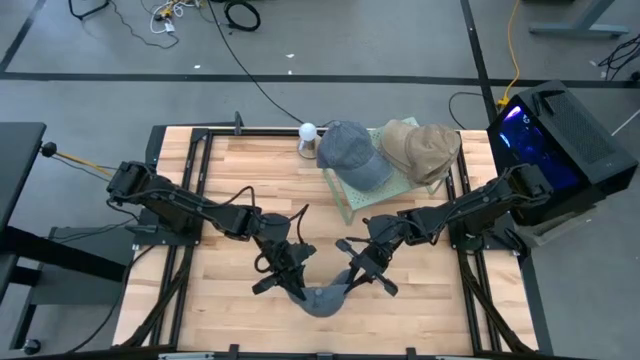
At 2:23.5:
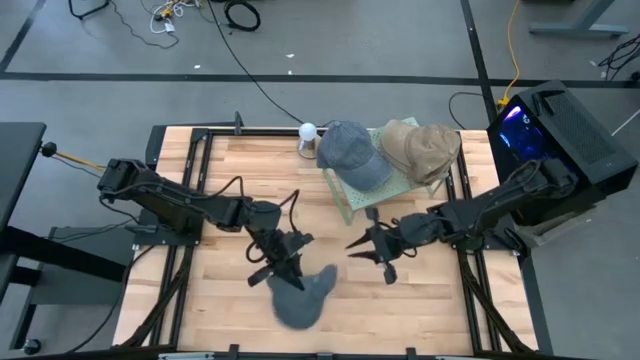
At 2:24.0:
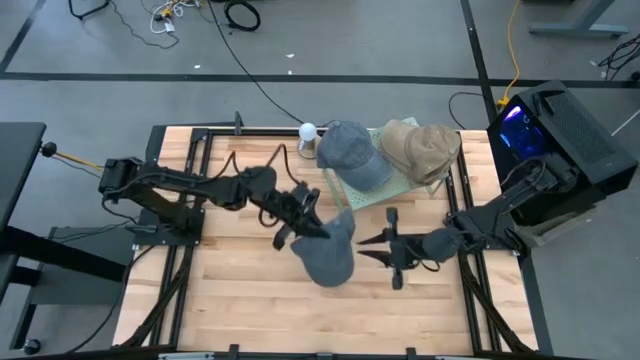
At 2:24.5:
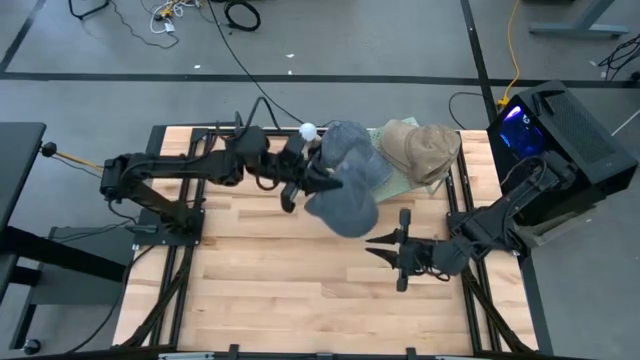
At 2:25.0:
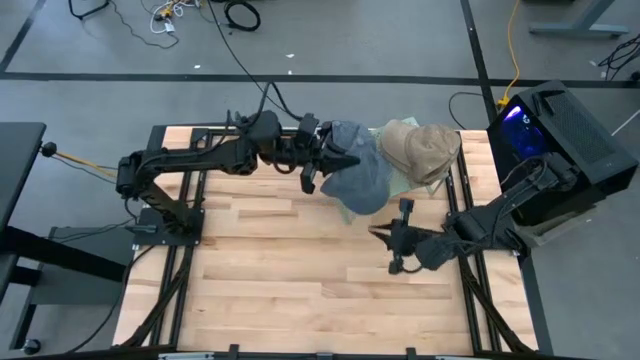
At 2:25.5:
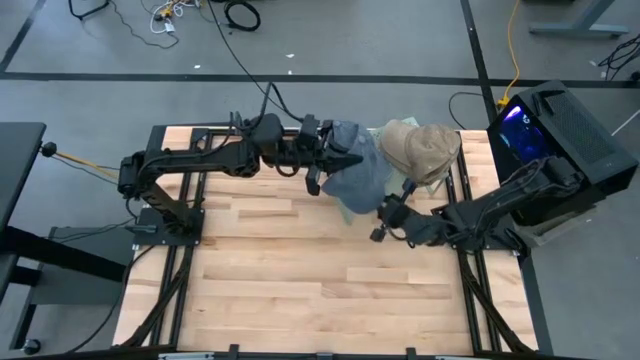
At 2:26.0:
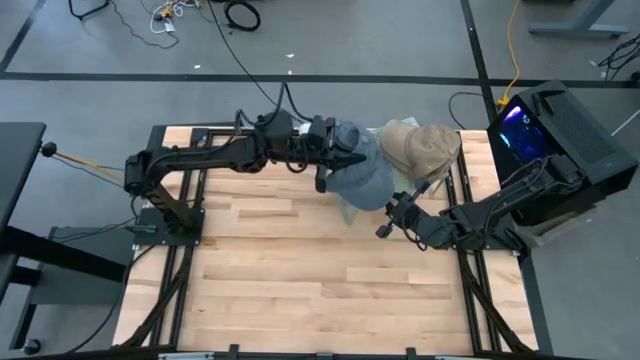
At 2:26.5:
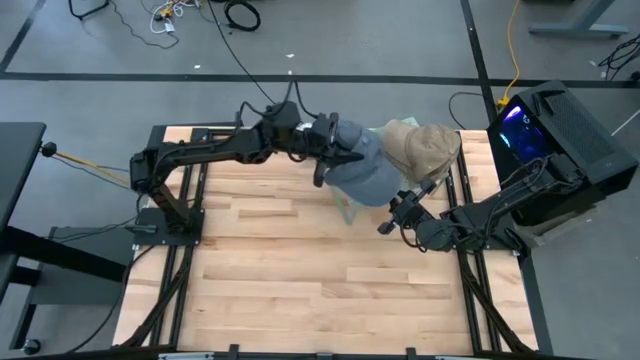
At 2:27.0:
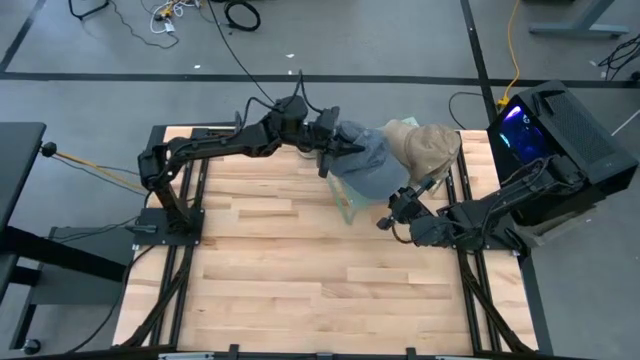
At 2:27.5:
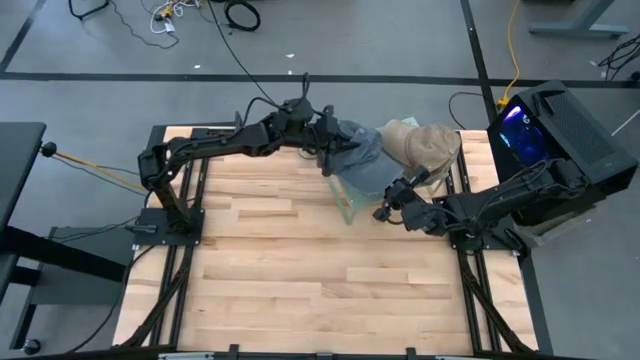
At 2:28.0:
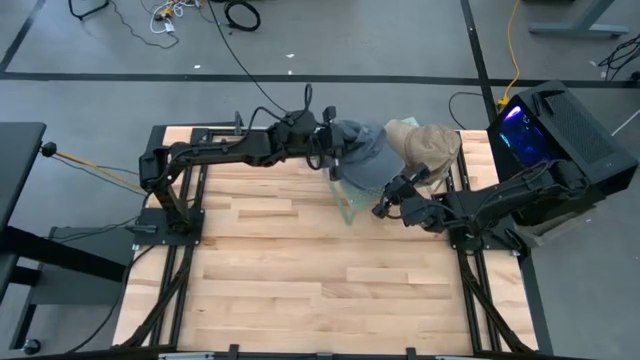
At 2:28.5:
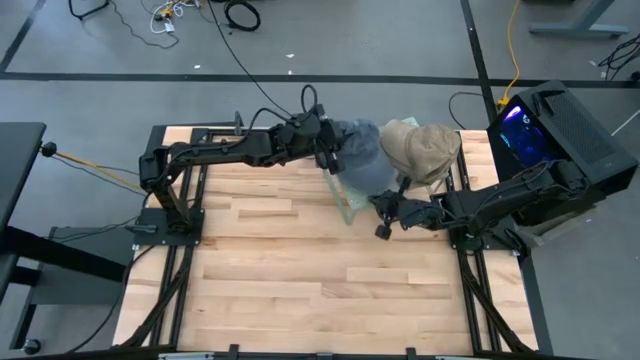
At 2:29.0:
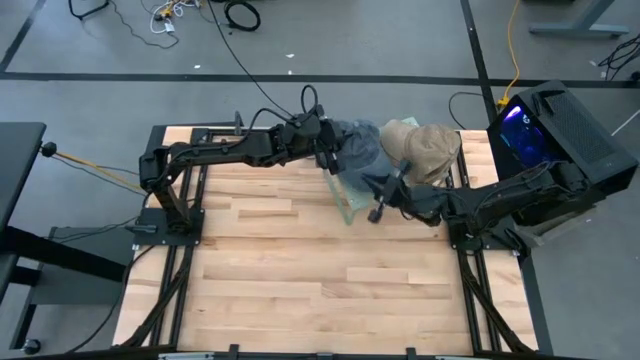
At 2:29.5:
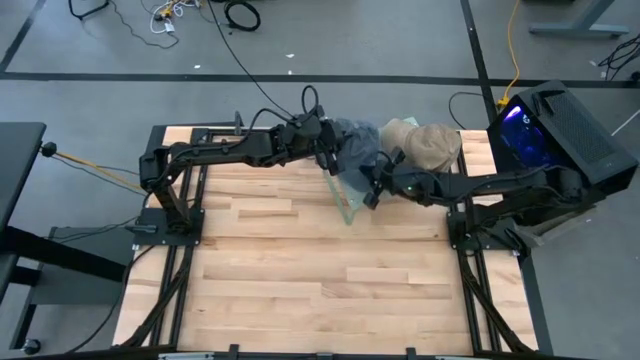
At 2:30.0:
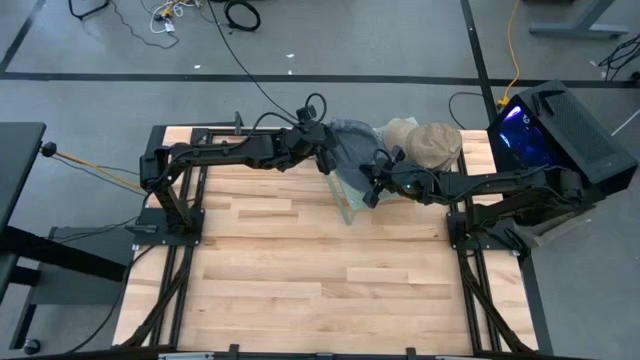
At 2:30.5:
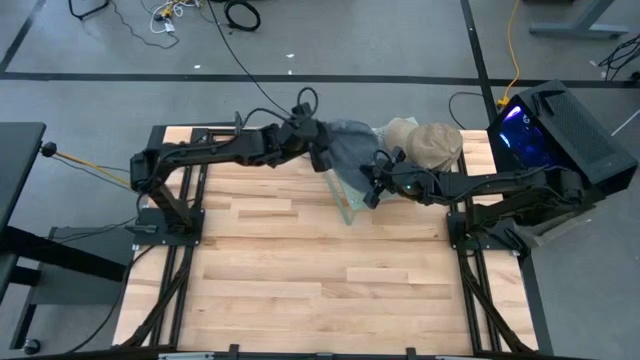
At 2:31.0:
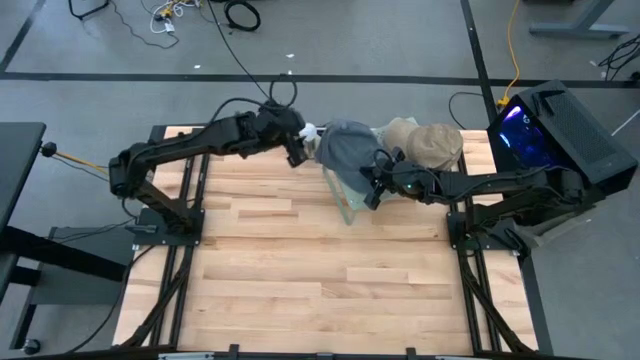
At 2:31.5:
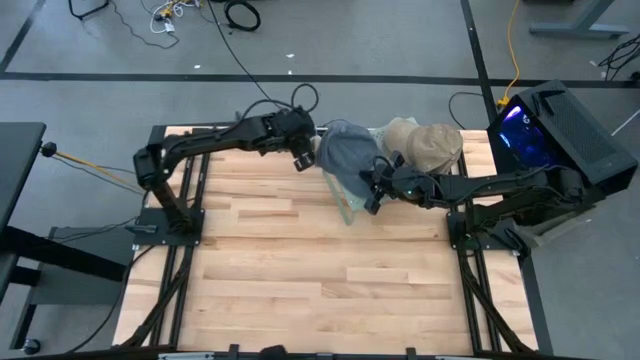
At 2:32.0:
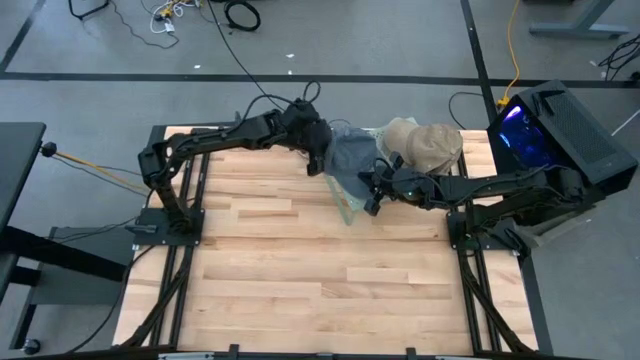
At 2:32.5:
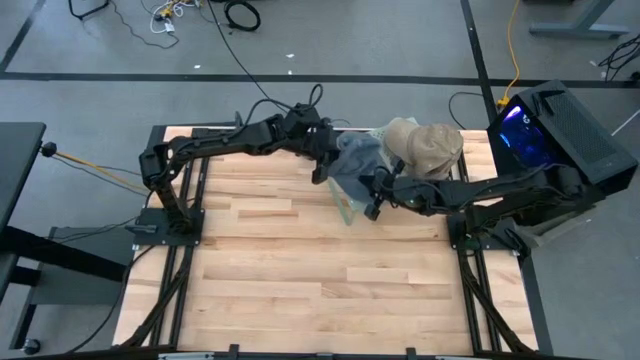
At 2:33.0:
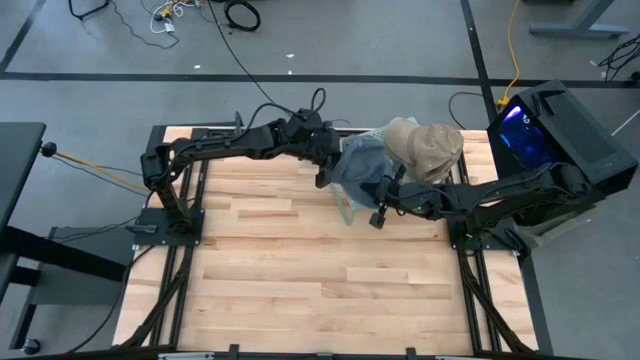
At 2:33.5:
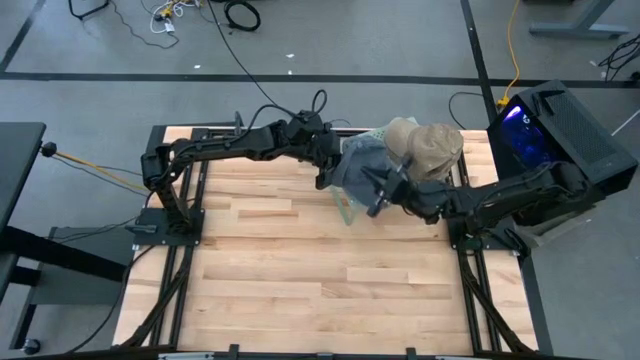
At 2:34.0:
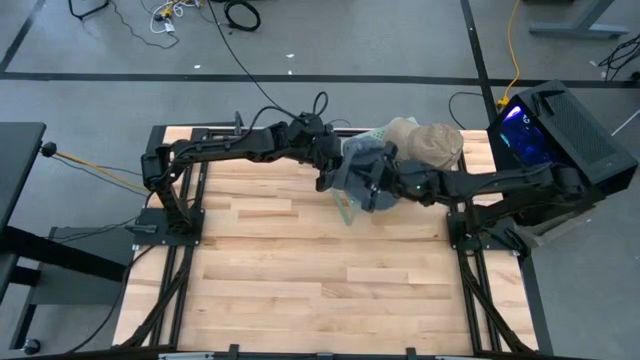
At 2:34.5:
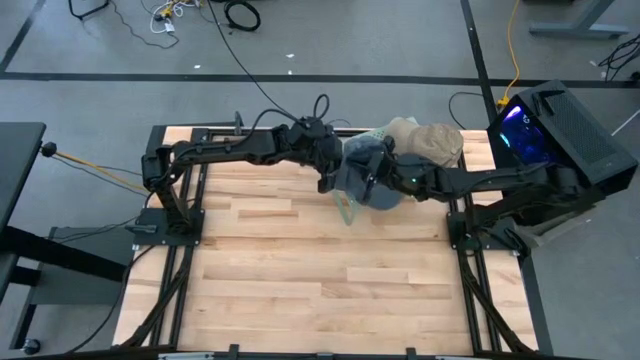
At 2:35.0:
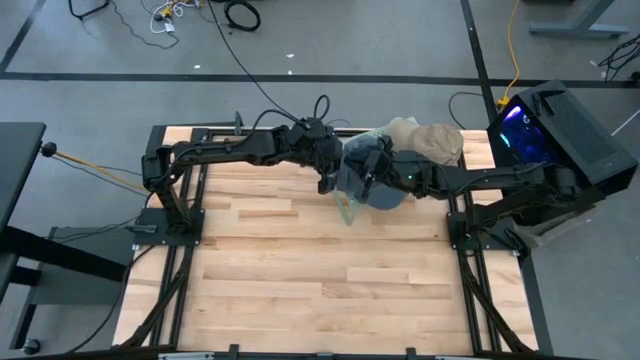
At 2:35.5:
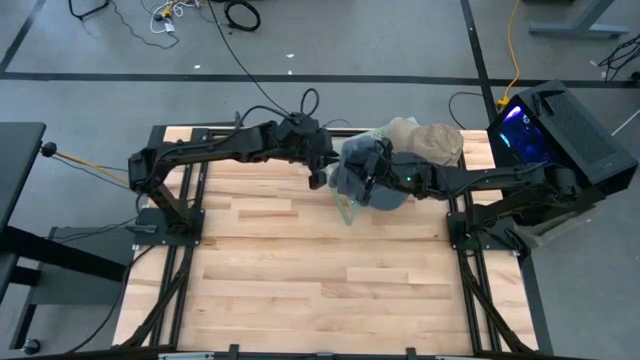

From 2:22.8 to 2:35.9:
Task: Stack caps on shelf
Stack the black cap on the black cap on the shelf

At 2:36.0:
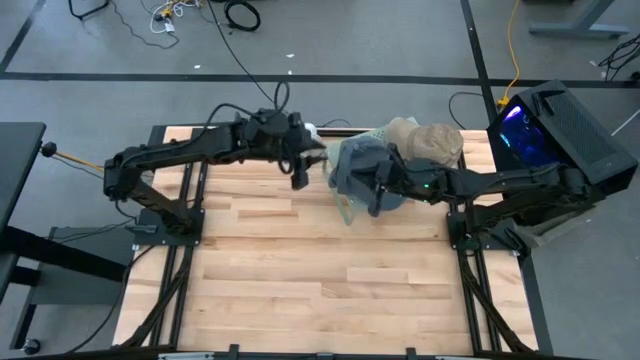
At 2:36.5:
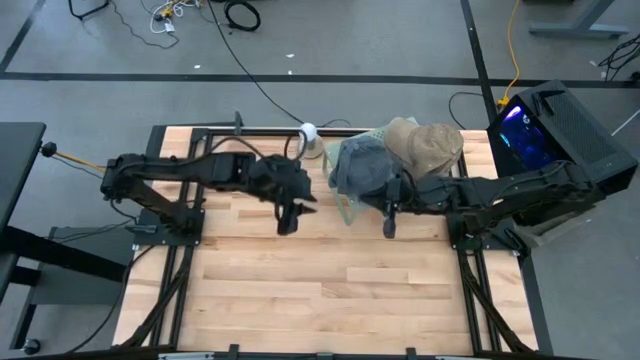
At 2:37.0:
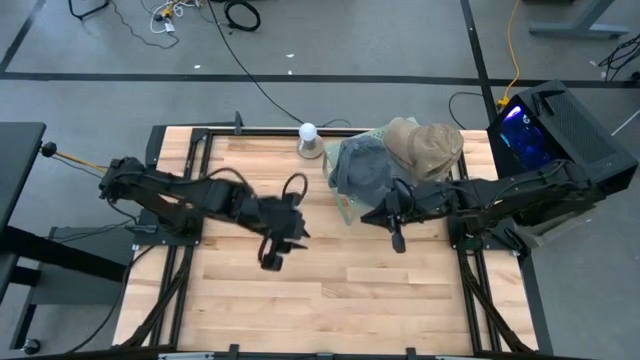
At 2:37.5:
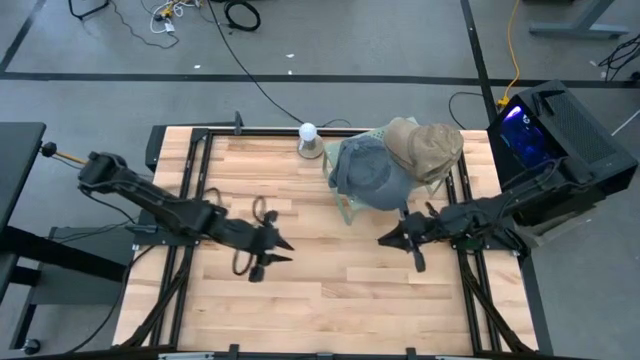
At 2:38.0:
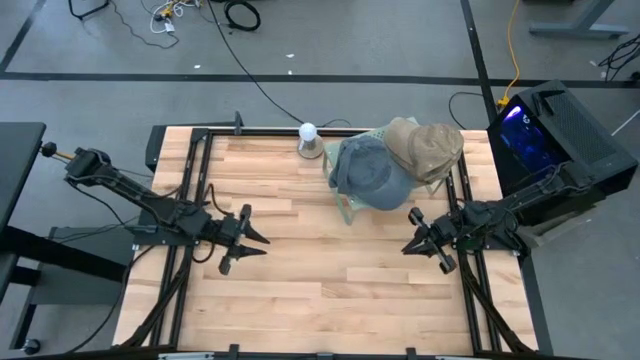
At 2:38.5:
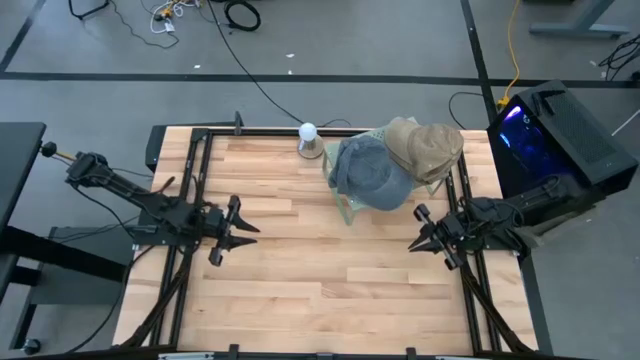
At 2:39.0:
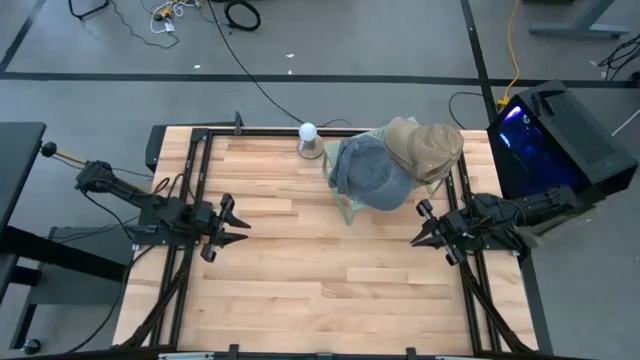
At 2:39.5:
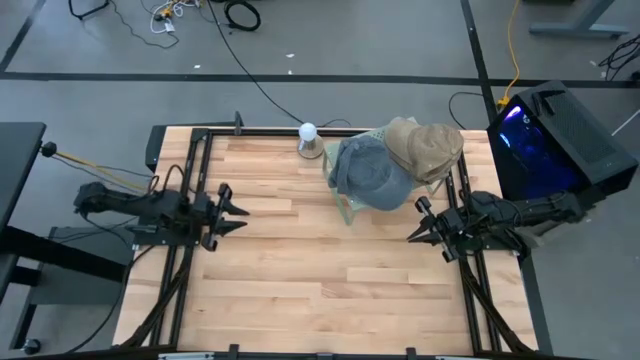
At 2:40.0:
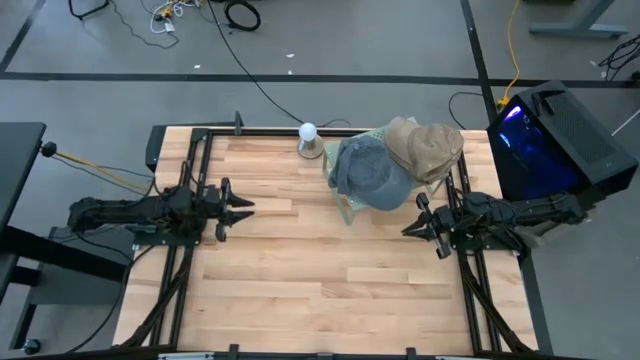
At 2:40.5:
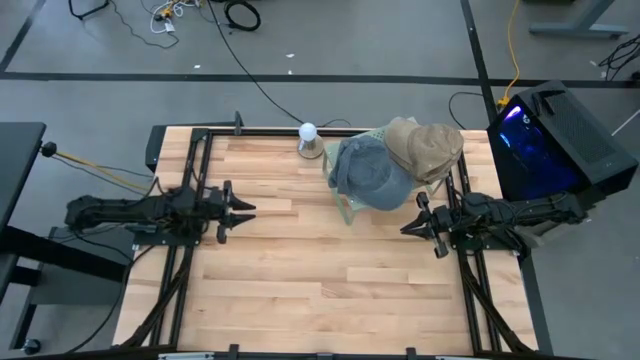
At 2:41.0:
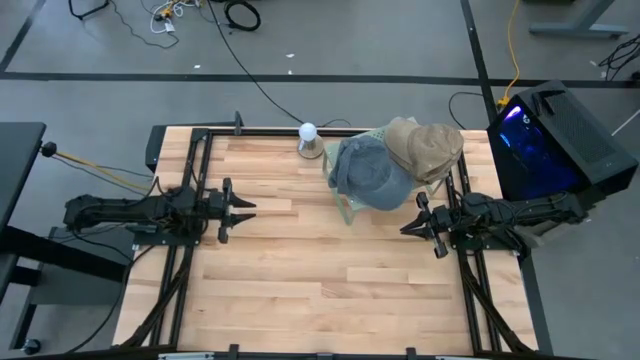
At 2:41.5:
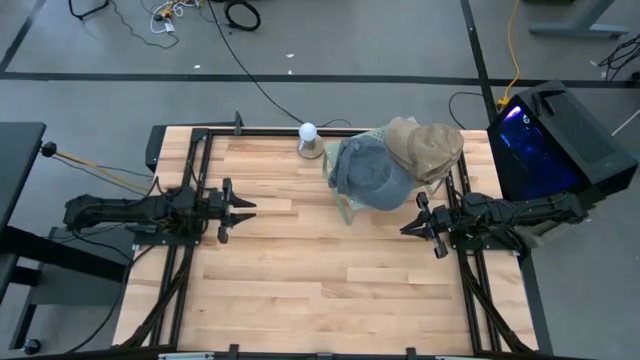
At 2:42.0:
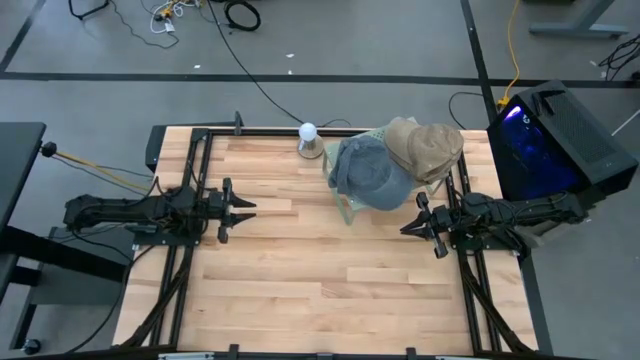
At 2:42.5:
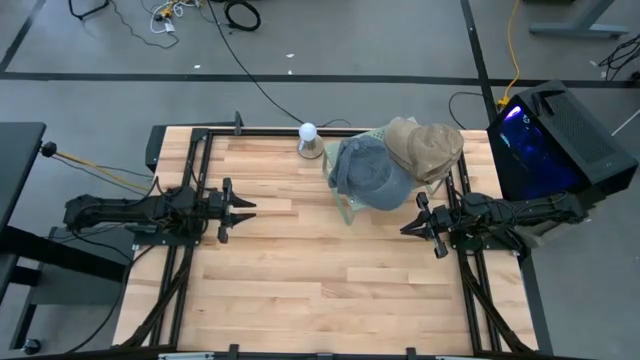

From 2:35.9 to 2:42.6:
Return to Home Position

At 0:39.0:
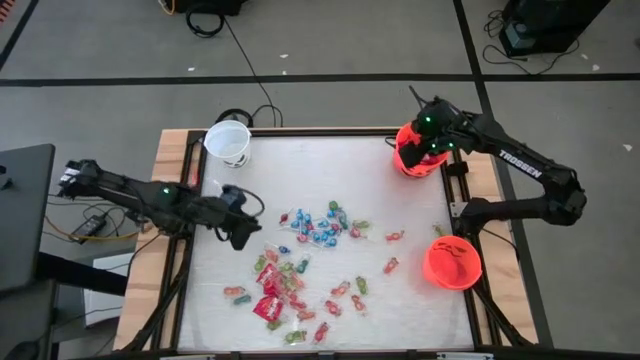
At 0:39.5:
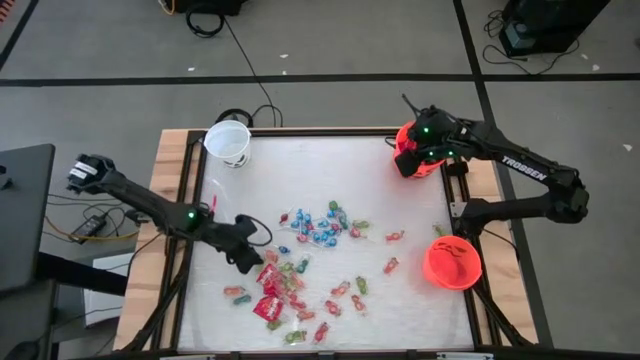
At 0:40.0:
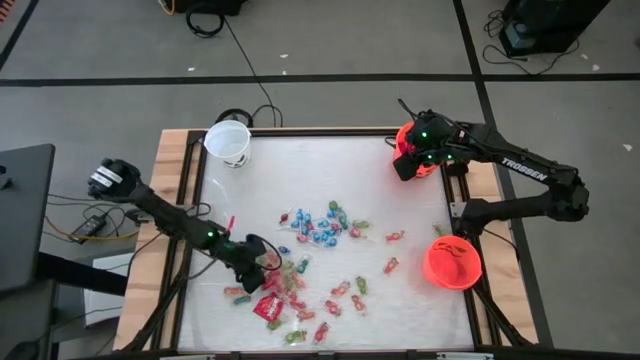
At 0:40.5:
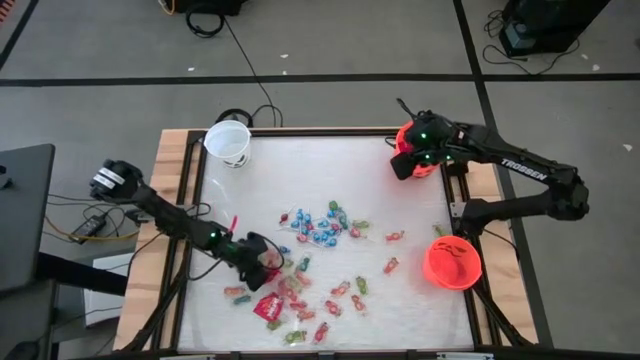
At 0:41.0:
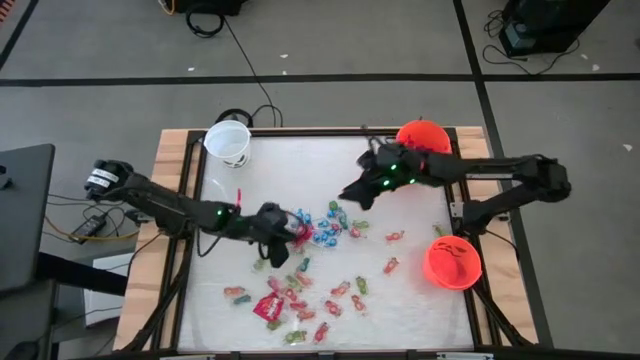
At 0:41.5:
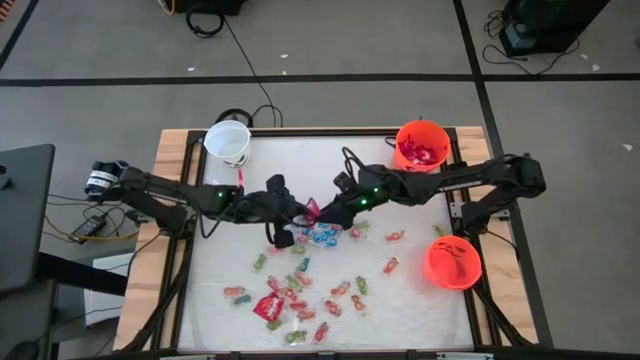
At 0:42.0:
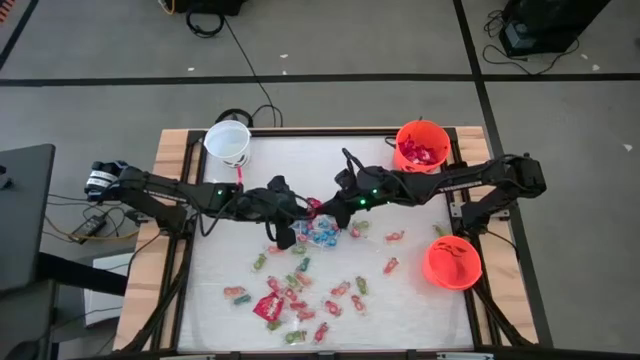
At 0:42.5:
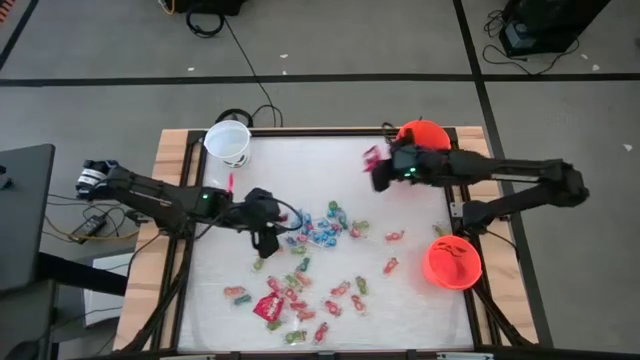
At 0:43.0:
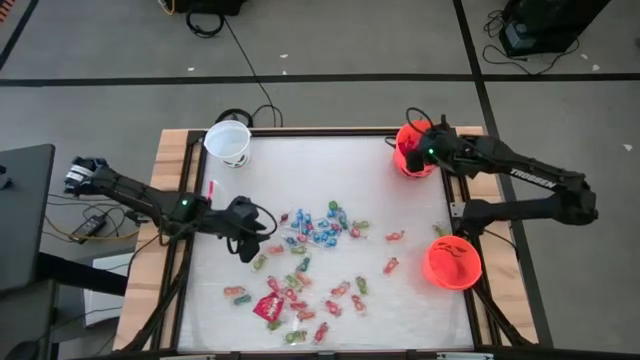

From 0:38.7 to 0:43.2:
Task: Sort candy by brand, put in halloween buckets
Put the red candy into the top orange bucket
